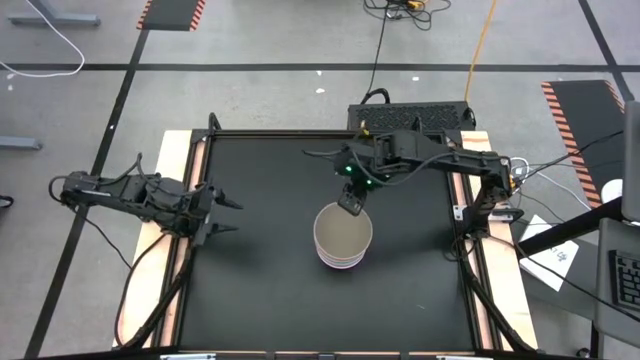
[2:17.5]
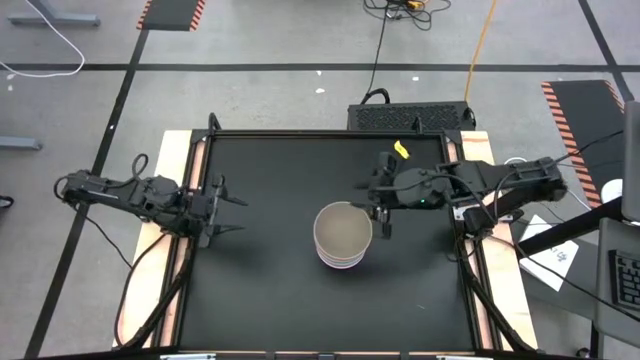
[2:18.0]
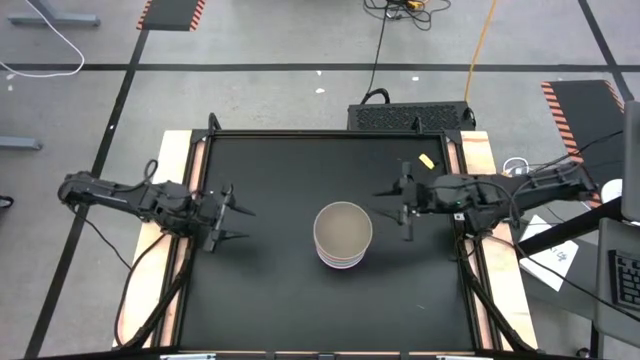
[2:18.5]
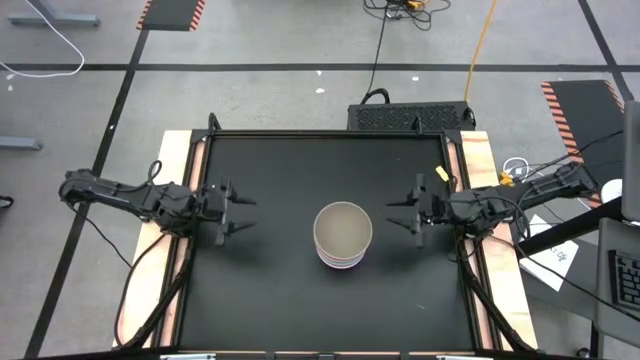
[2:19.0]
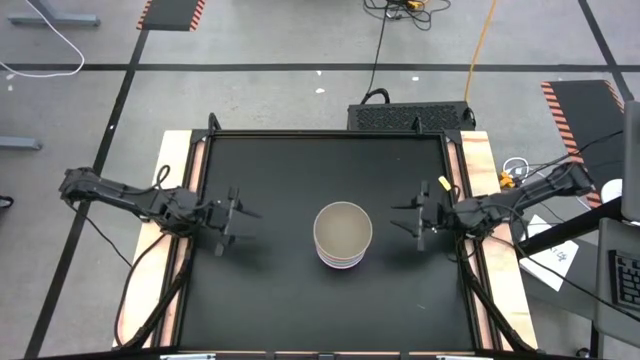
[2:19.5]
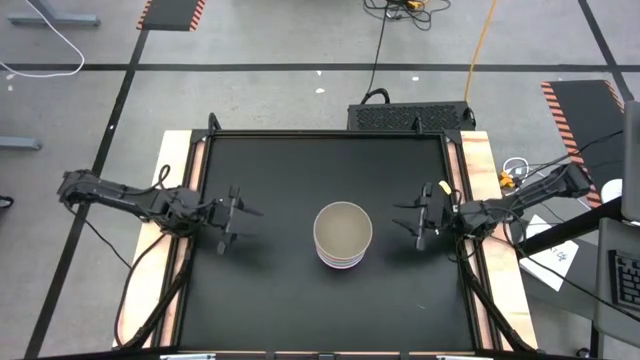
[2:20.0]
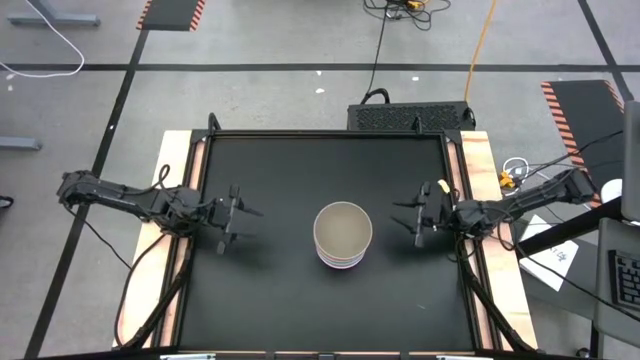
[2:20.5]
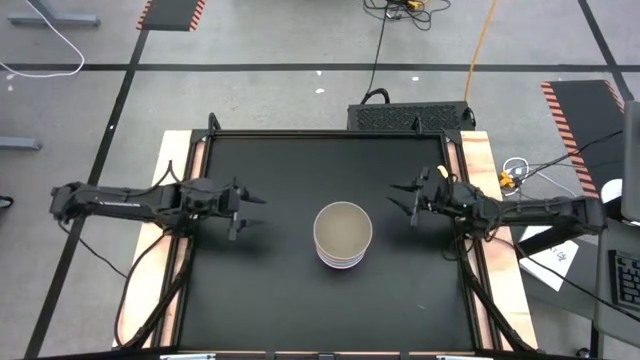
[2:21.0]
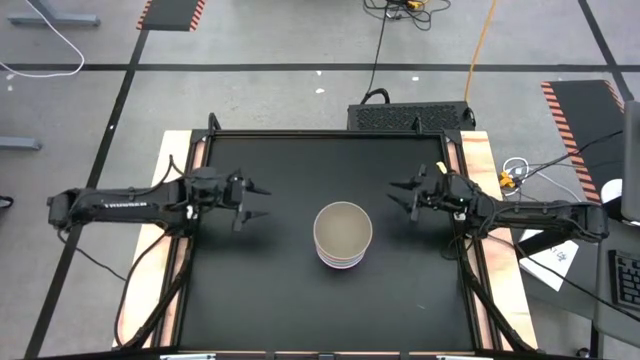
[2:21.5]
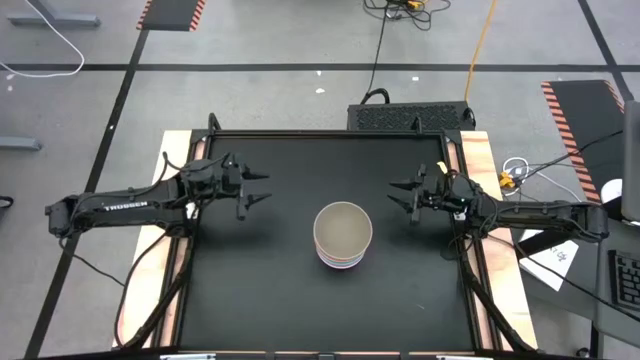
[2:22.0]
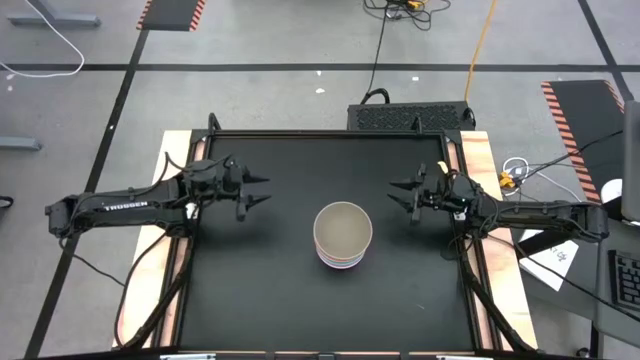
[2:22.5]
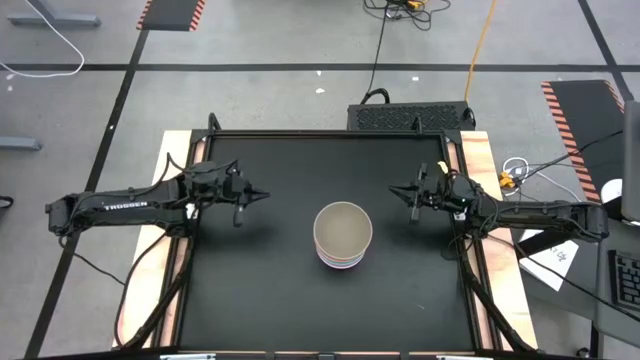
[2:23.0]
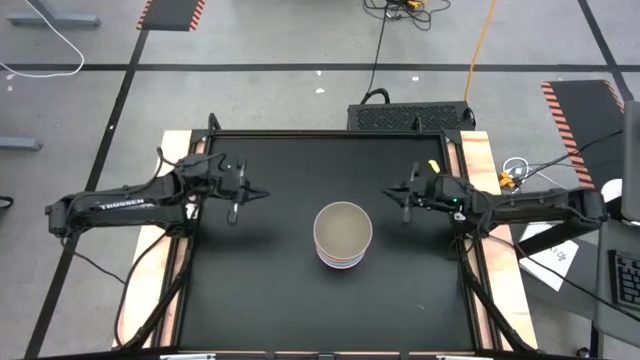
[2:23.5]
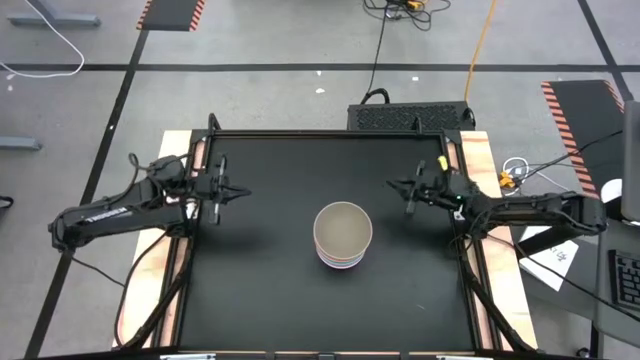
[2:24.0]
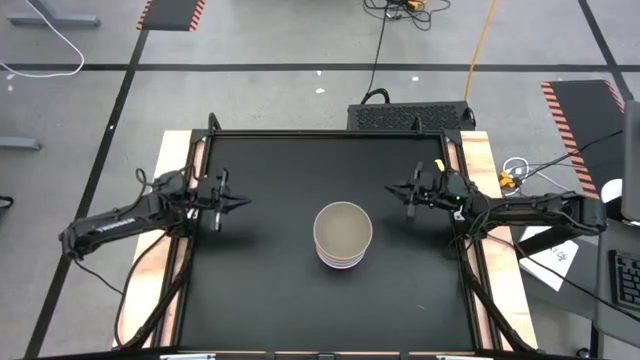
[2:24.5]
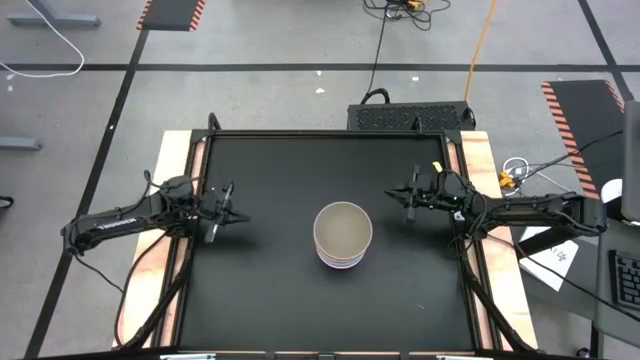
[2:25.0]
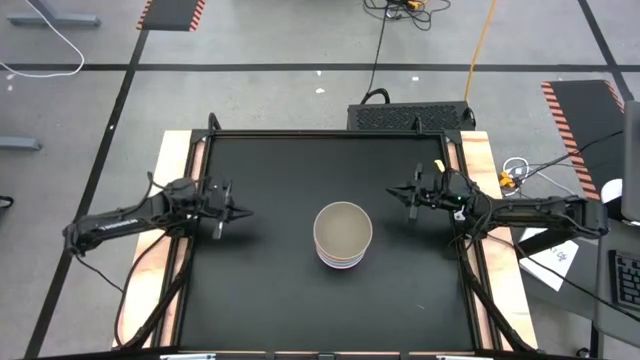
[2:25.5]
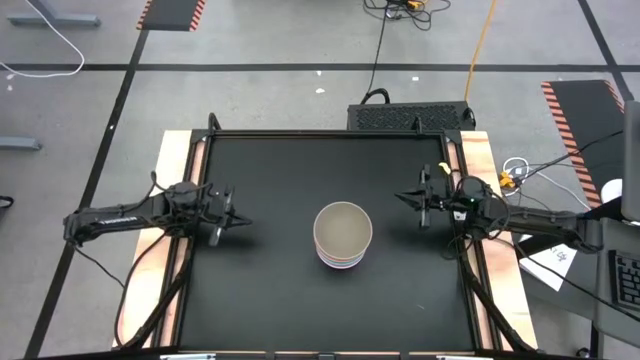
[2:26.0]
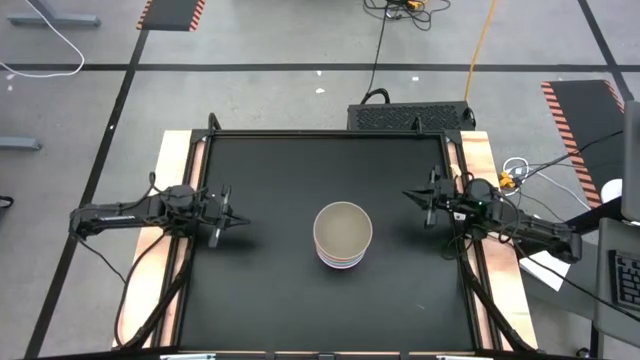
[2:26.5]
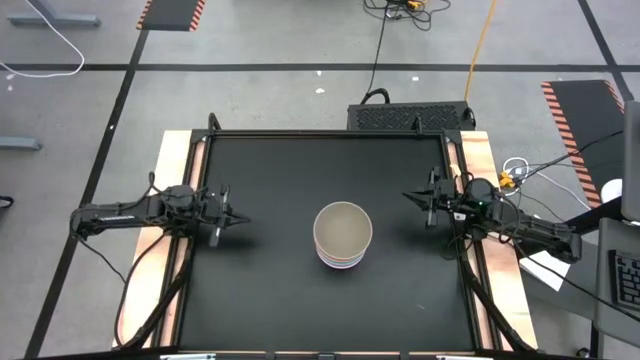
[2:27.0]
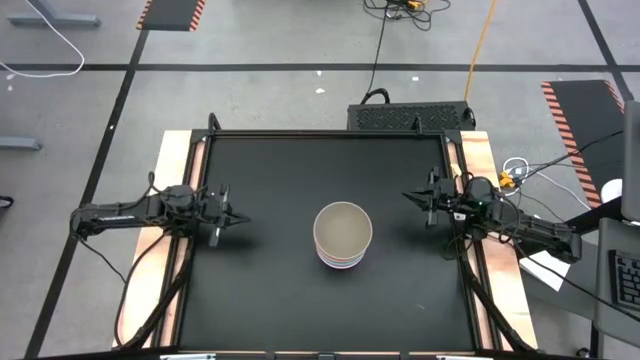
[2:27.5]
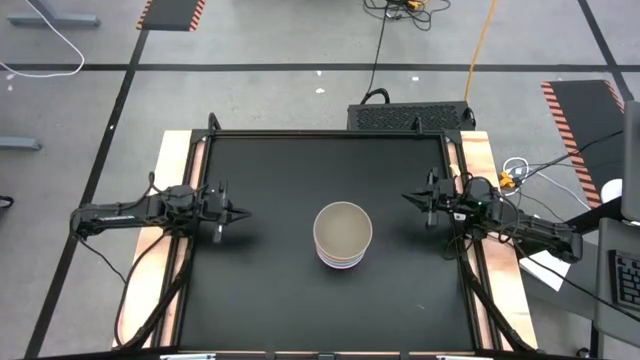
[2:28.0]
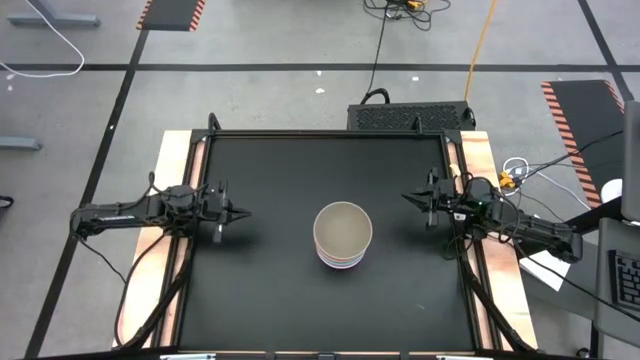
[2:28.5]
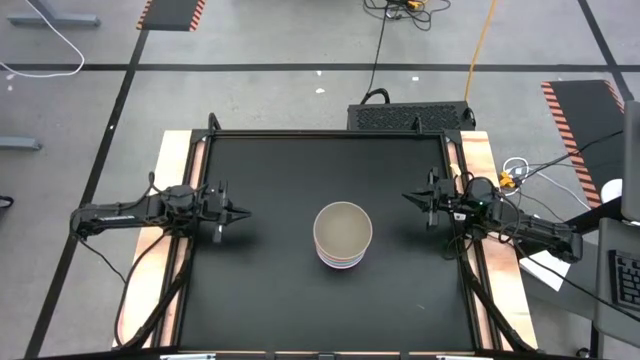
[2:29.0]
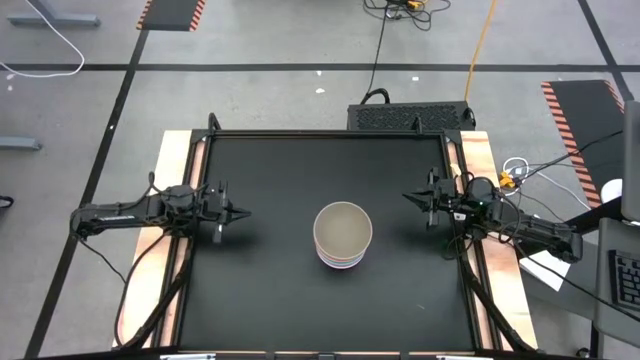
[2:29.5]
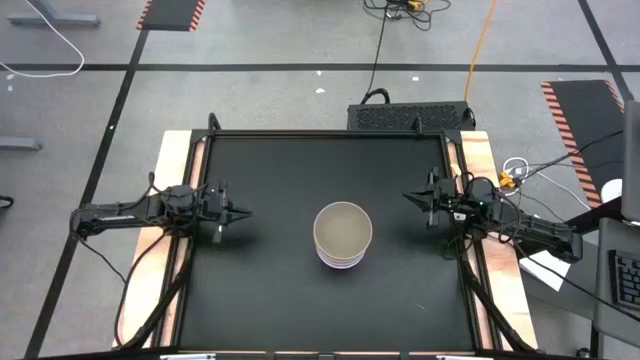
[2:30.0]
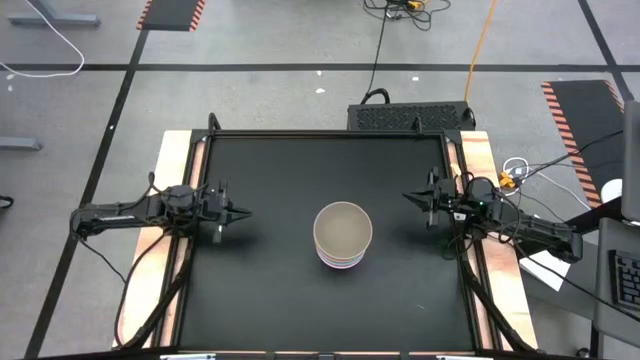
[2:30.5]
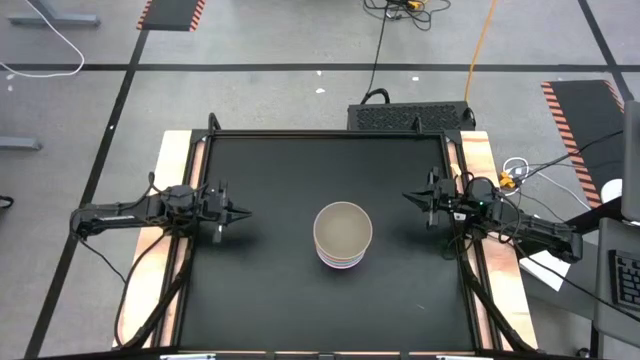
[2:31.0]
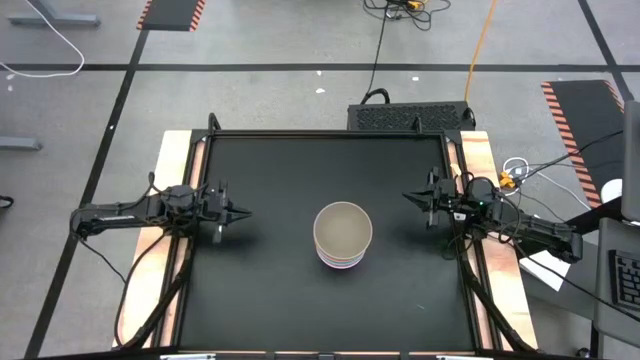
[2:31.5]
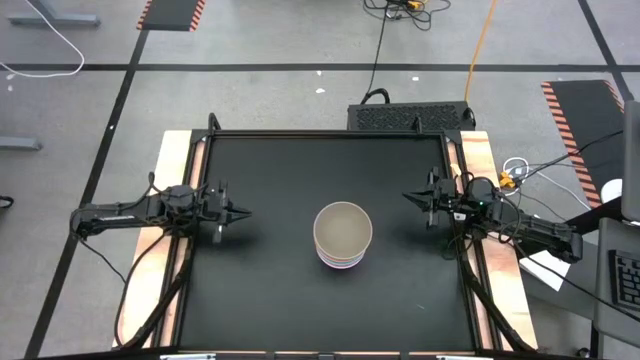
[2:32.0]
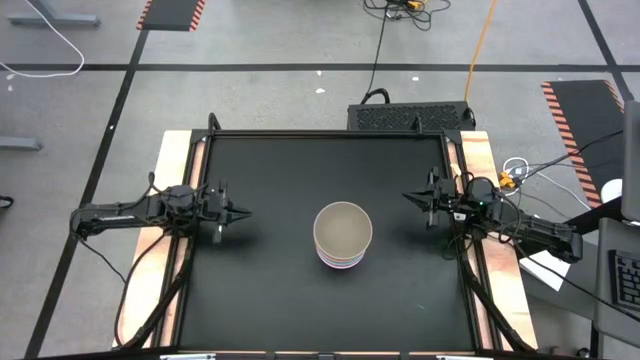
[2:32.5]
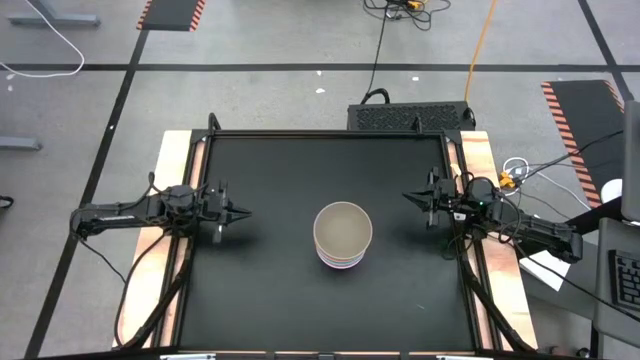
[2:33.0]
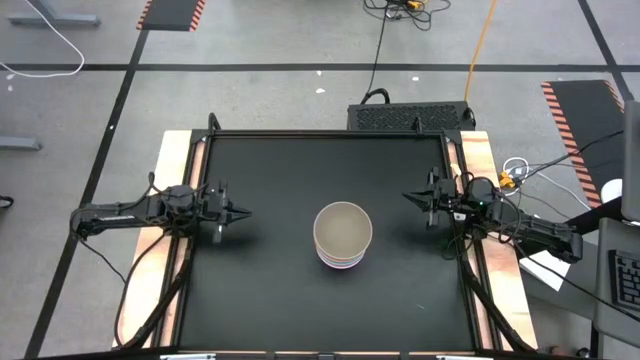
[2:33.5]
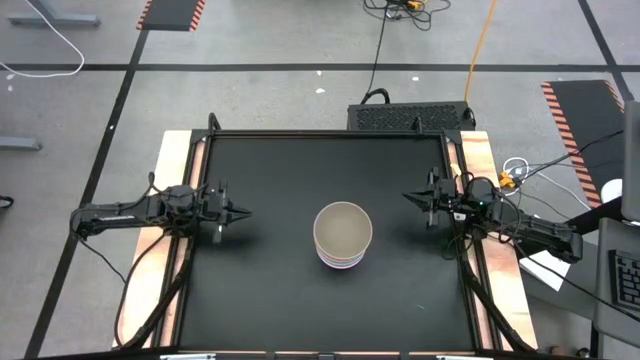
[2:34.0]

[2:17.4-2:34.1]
Task: Nest bowls inside each other
Return to Home Position

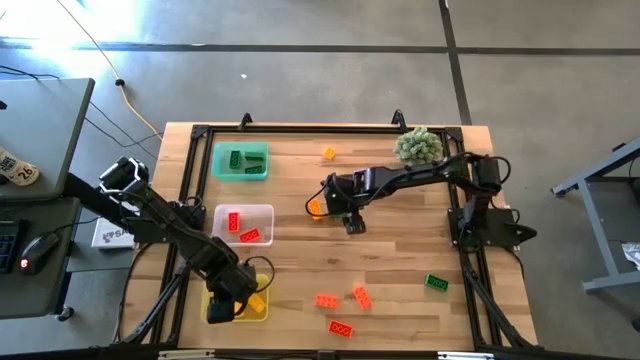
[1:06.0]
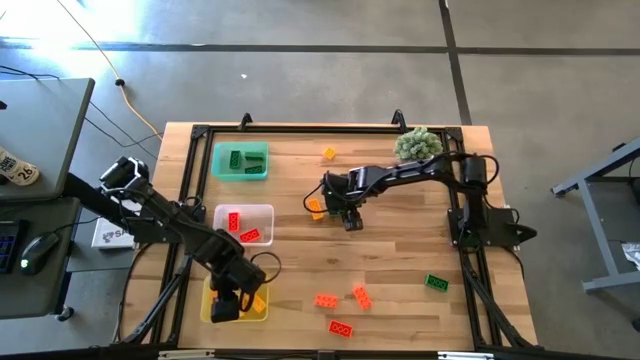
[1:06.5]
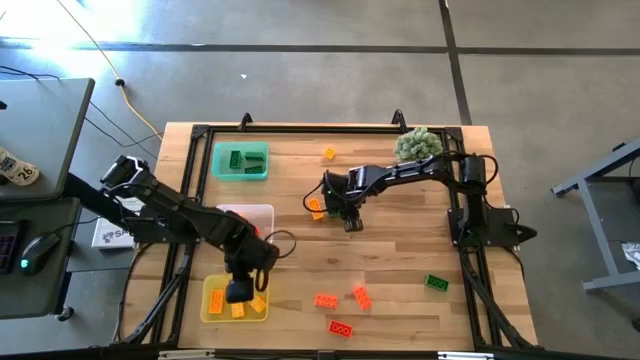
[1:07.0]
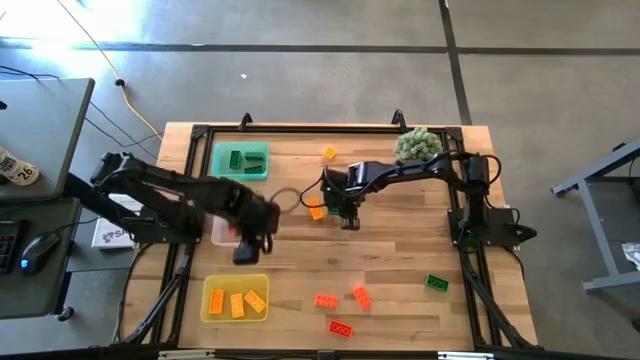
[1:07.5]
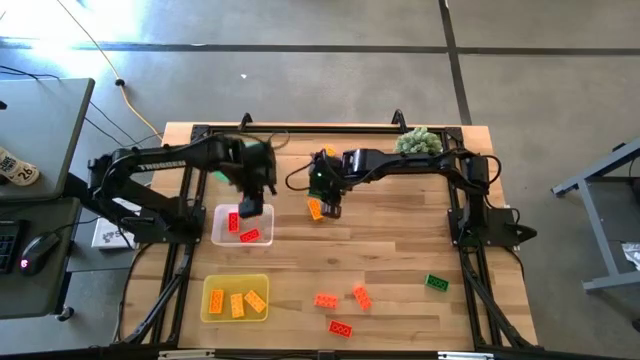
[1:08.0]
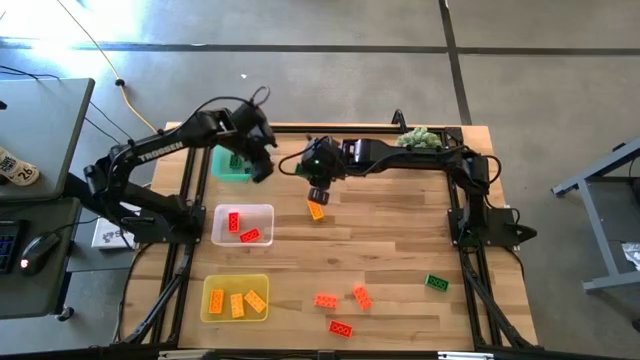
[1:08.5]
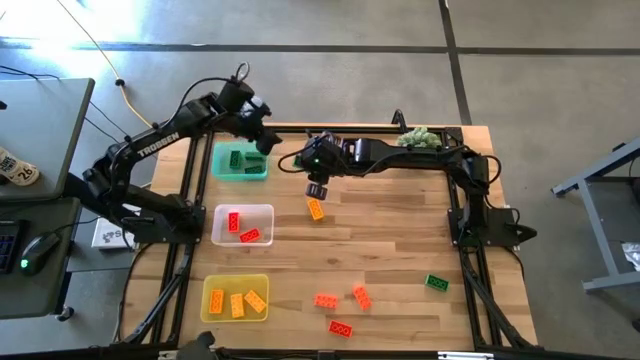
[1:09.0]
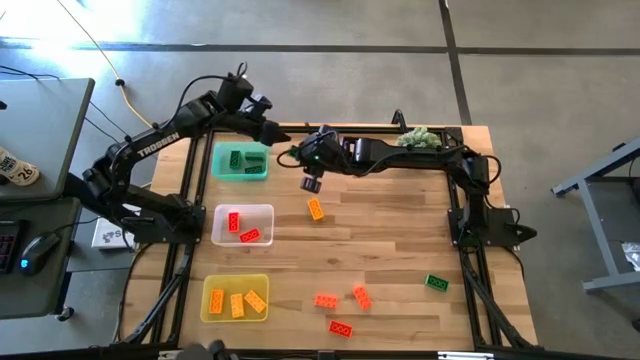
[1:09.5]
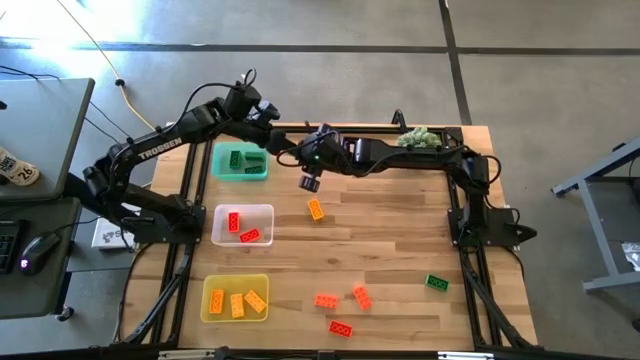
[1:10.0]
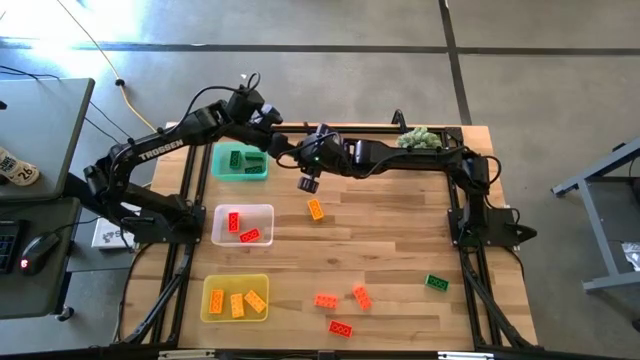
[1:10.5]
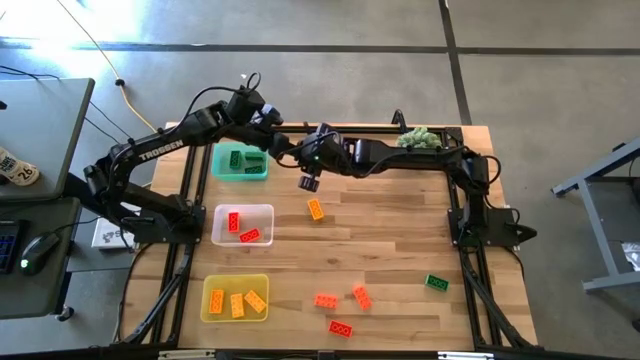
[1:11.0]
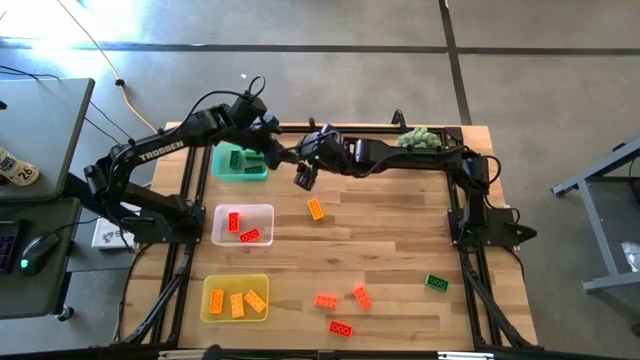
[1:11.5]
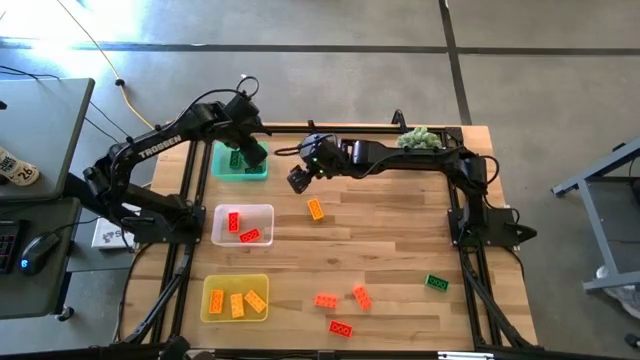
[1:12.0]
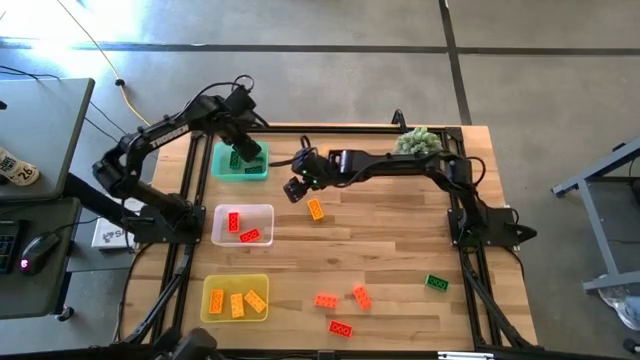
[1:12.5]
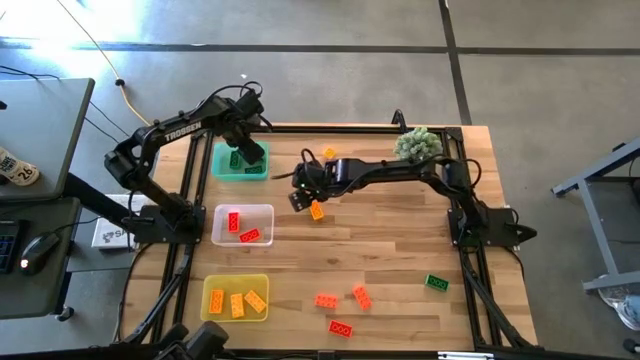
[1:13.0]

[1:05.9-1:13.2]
Task: Sort & place blocks by color
Put the green game piece into the green bin
